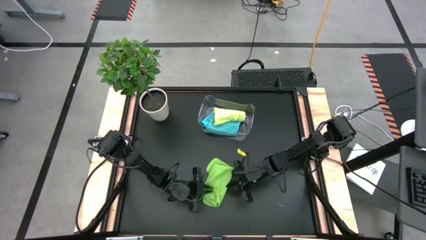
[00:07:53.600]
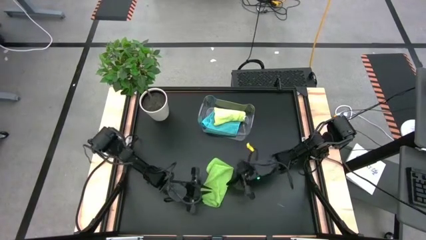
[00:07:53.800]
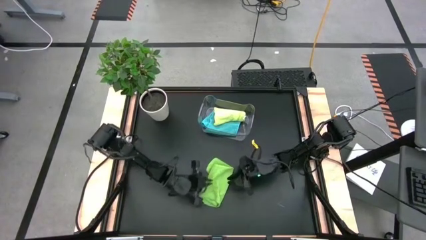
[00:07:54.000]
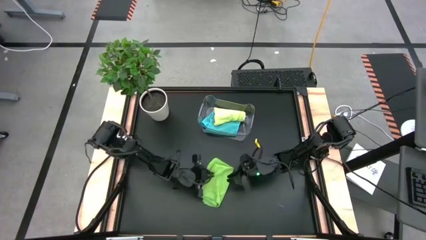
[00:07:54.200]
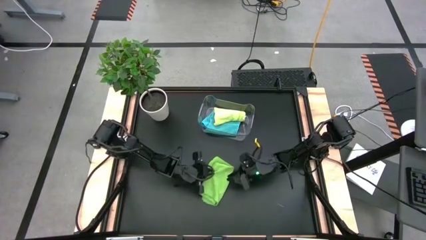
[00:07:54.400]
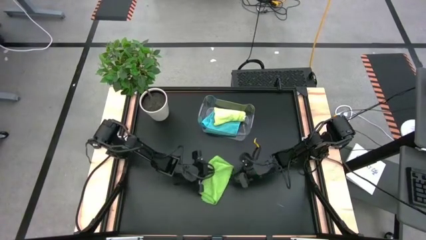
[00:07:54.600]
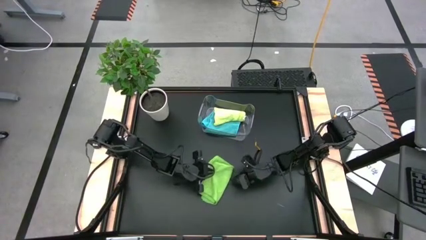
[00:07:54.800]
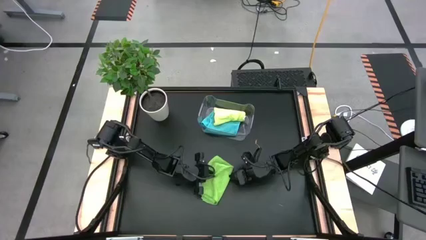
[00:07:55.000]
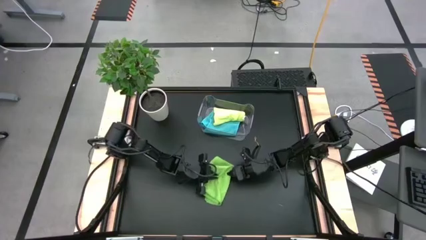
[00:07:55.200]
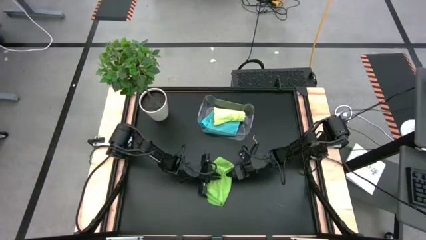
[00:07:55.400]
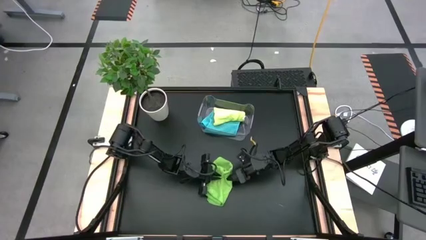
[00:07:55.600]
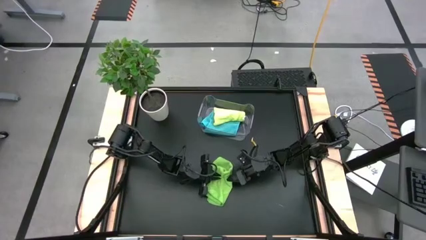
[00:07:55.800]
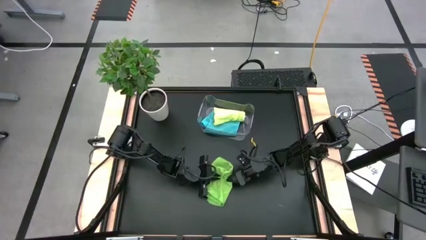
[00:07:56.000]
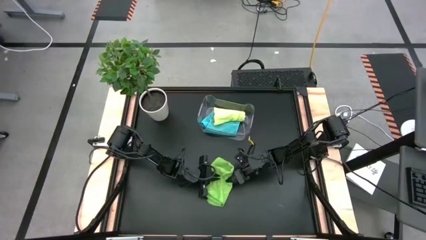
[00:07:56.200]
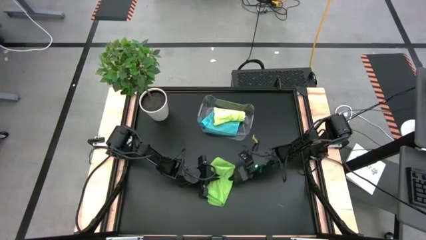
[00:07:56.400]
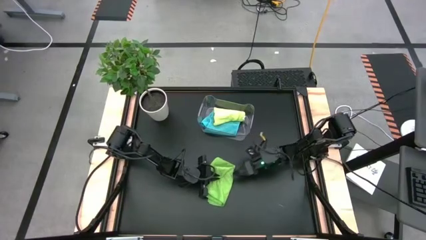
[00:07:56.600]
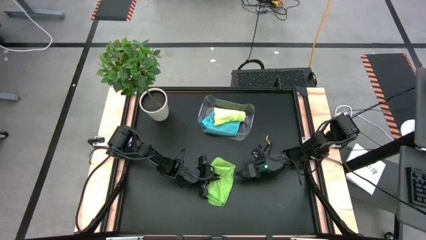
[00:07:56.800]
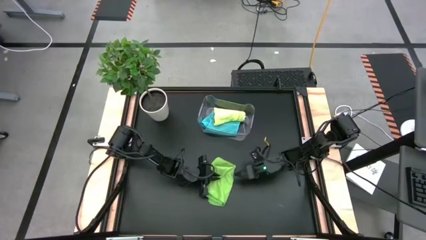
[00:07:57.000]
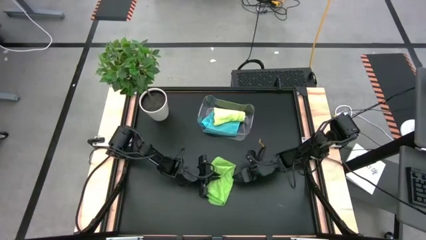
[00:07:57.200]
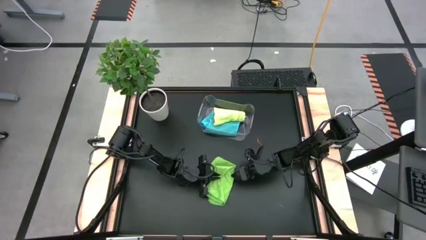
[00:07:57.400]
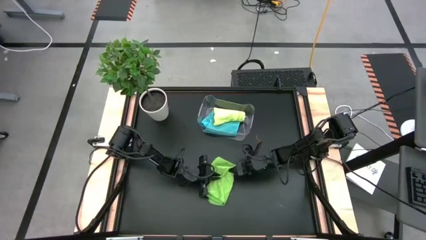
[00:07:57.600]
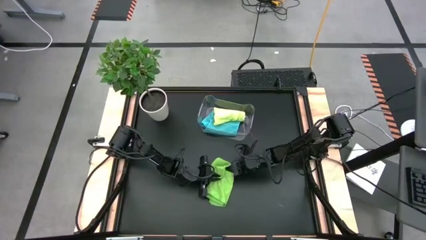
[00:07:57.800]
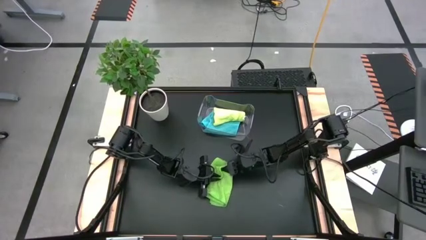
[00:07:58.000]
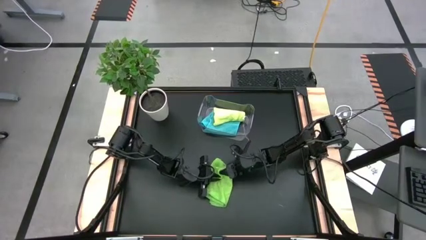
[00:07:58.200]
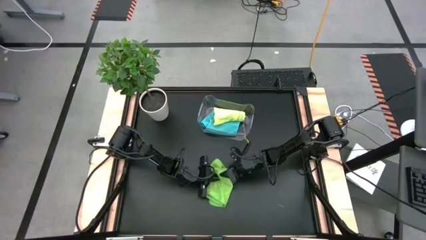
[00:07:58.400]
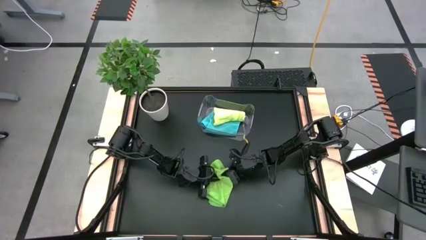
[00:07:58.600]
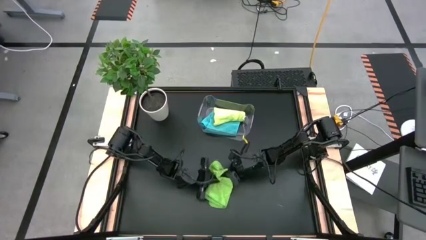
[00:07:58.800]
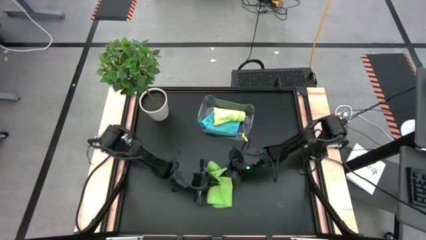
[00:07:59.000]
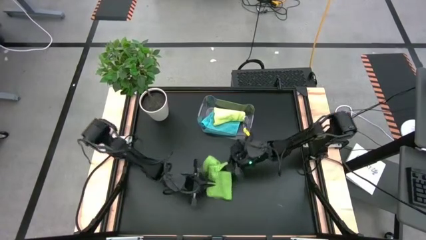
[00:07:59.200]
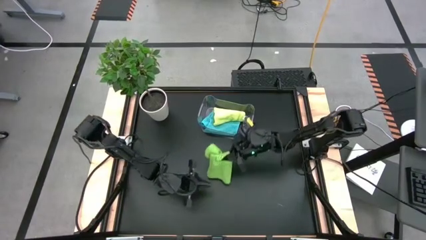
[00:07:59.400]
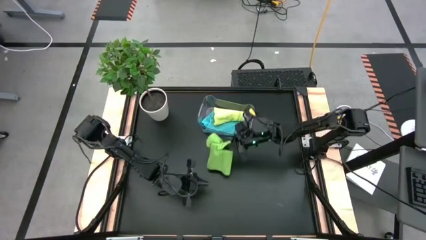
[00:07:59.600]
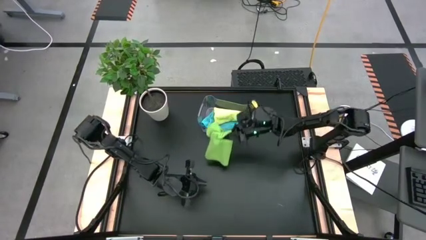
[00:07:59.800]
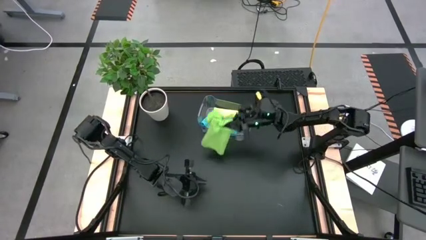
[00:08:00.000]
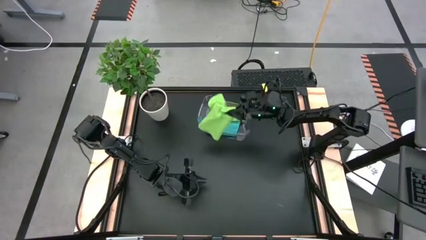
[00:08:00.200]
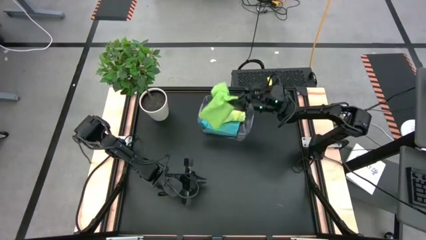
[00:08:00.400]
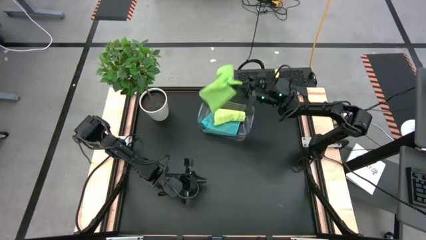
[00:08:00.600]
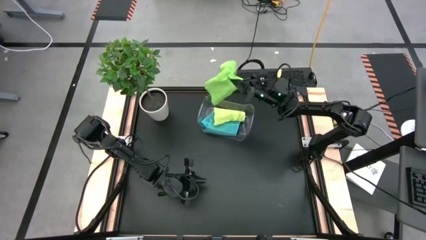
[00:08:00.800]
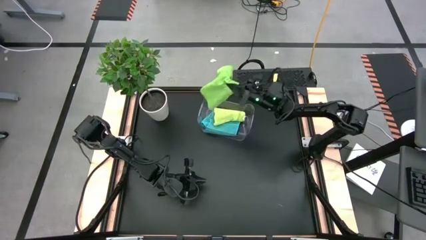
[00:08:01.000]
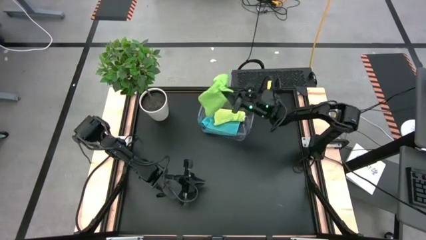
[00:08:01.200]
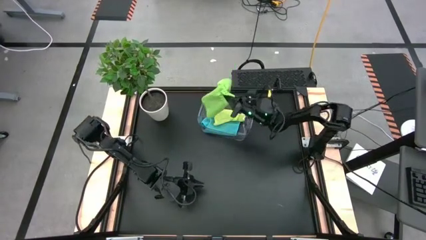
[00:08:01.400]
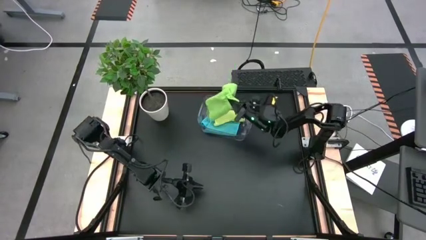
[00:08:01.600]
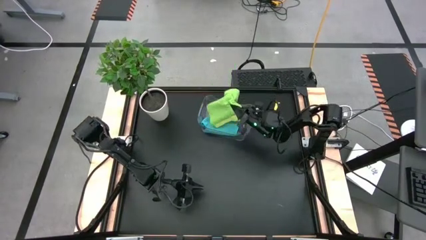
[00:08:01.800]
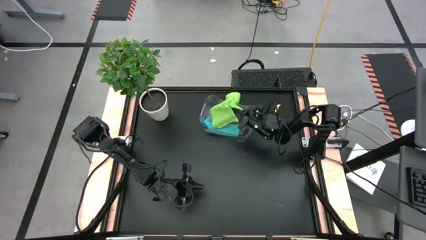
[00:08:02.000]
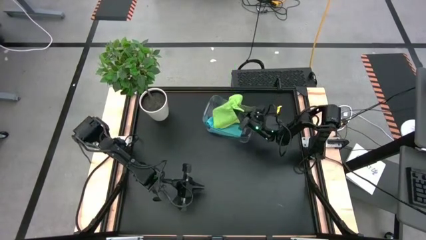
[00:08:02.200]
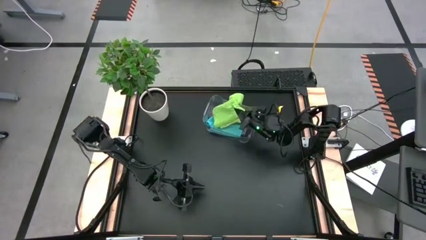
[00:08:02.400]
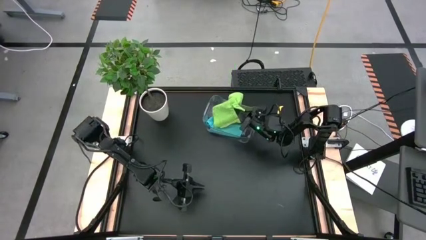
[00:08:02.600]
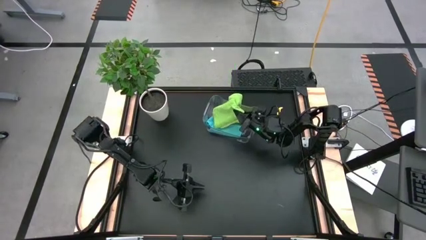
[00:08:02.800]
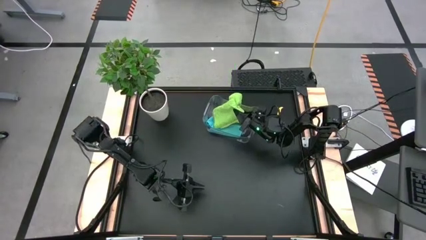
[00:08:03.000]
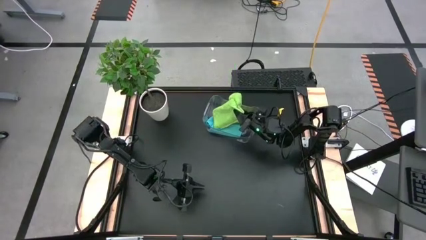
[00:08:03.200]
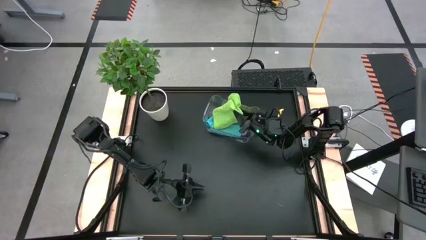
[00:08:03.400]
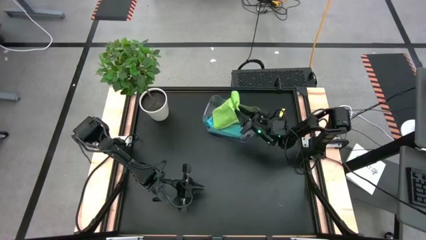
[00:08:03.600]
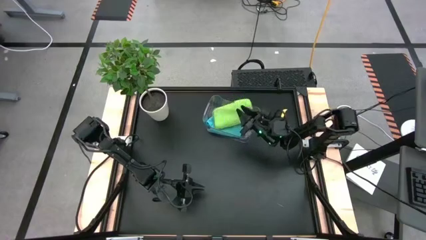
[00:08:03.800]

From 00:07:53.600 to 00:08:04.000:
Task: Fold microfiber towels
Put the green towel into the transparent bin

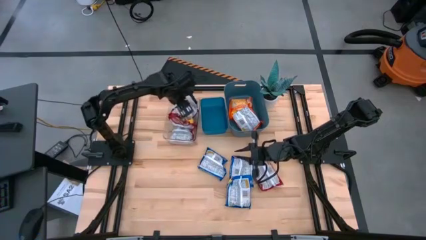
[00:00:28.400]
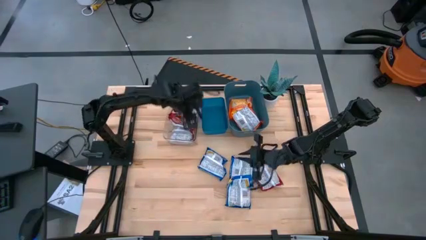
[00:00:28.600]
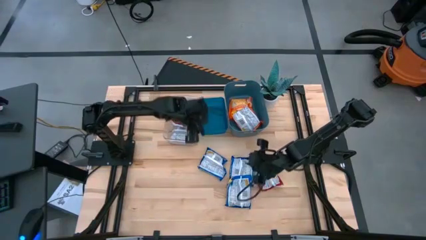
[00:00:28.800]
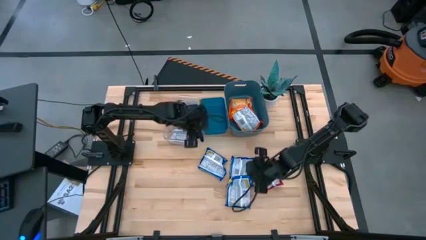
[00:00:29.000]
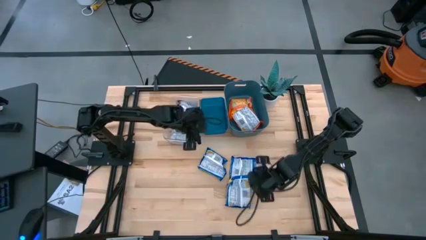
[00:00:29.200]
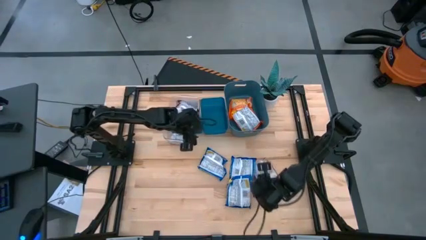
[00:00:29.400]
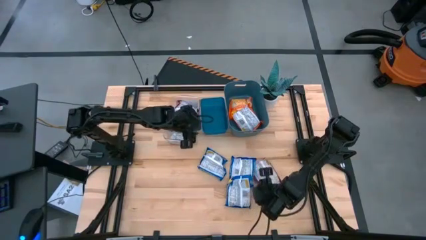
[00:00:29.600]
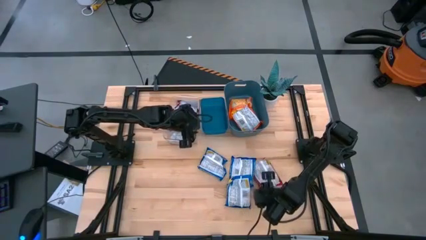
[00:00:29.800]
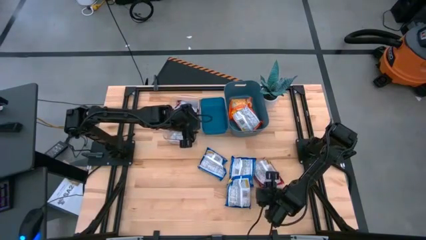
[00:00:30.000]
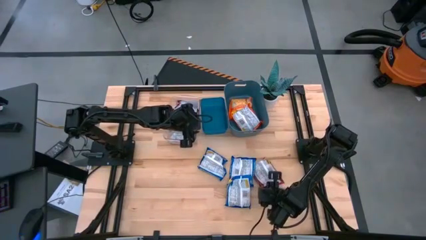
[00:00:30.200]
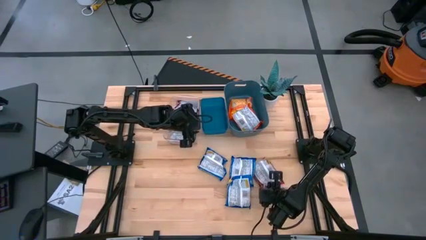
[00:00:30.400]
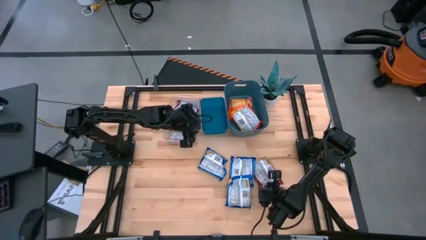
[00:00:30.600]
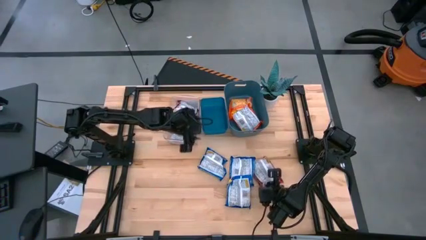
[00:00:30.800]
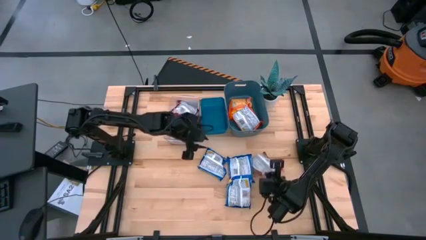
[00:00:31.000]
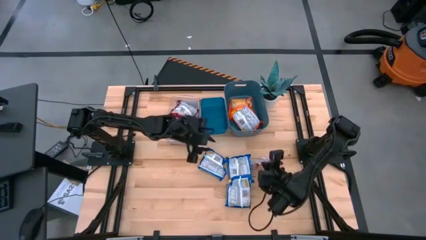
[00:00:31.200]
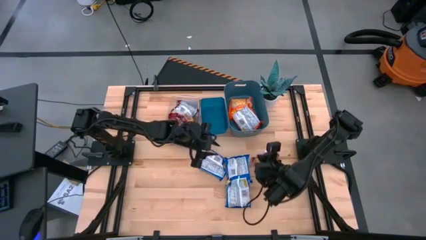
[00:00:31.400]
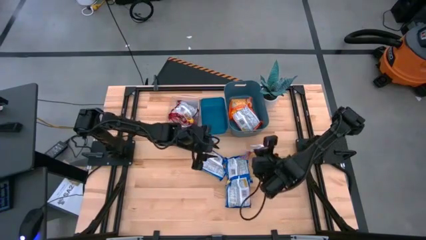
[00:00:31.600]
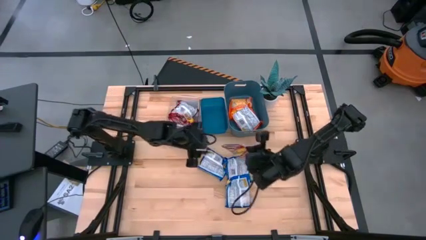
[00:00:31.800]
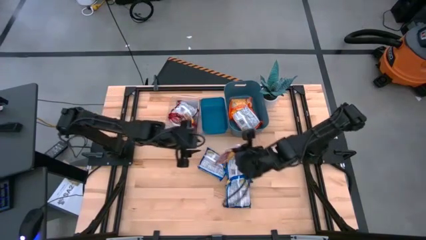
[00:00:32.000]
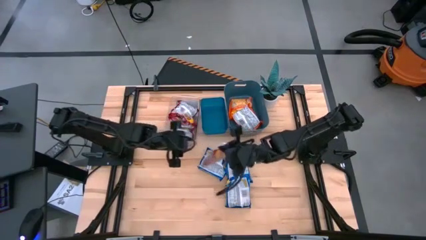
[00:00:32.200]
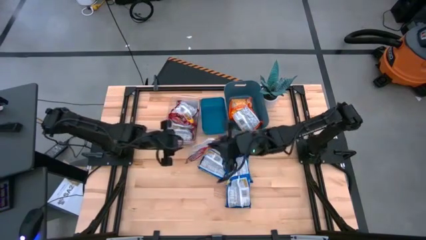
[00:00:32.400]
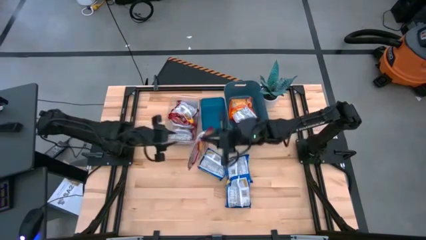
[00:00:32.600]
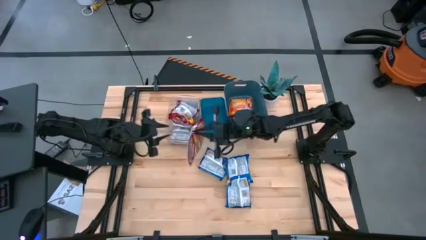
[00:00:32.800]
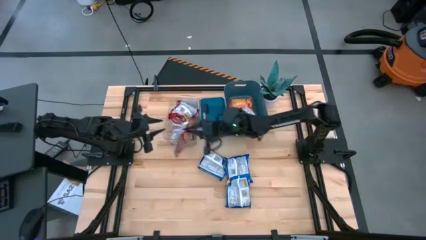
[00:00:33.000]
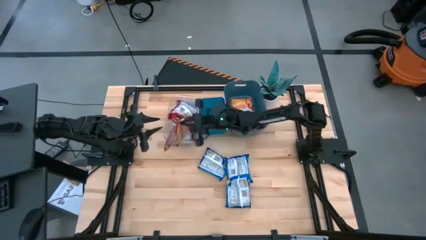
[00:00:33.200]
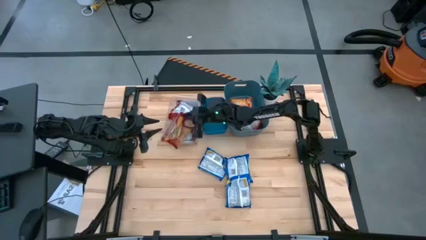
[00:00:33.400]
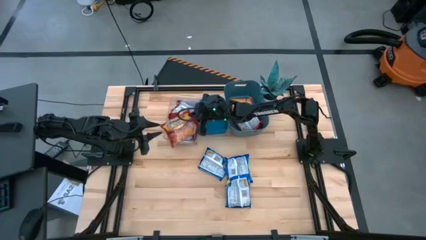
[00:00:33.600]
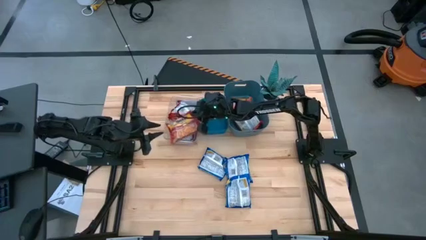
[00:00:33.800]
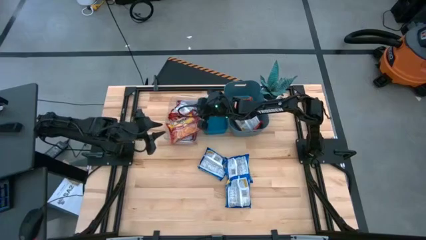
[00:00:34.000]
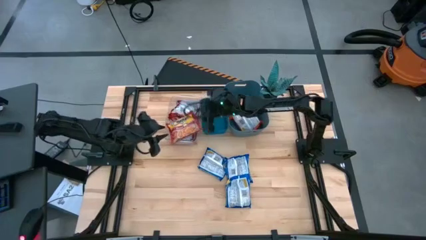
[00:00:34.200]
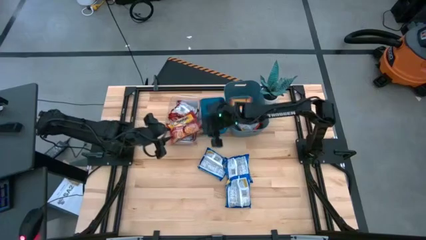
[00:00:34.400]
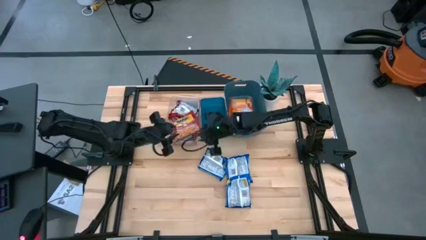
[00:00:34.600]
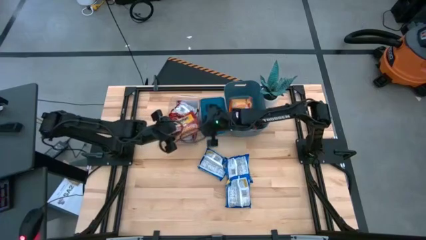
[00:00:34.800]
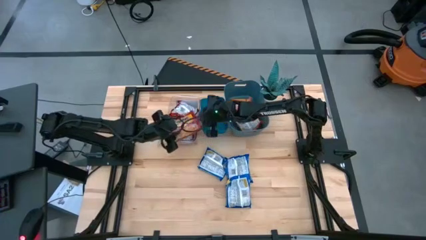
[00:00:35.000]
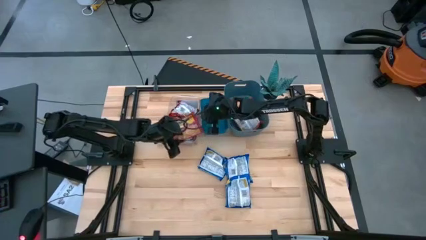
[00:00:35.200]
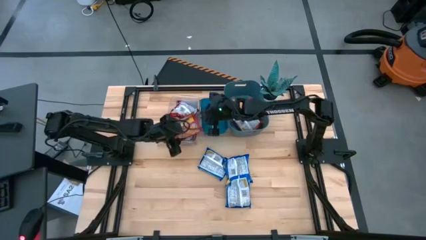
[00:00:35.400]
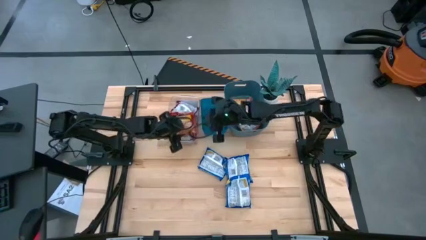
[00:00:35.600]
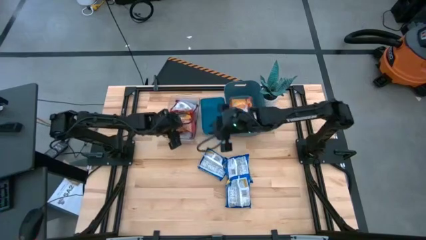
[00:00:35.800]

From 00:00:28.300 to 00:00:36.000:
Task: Sort Maruchan noodles
Put the red noodle pack into the transparent bin
